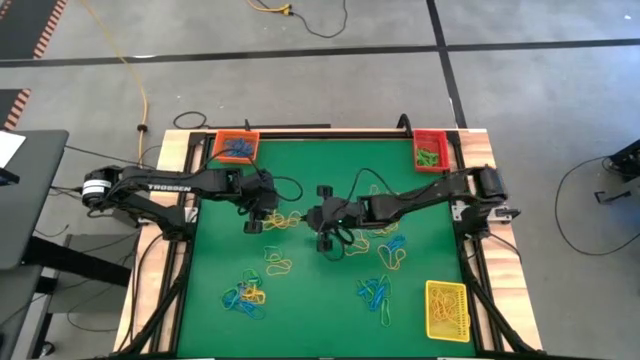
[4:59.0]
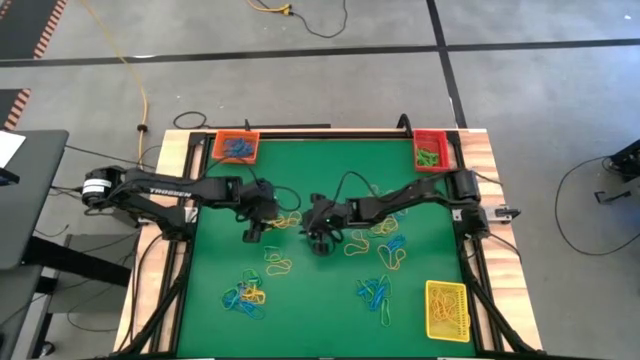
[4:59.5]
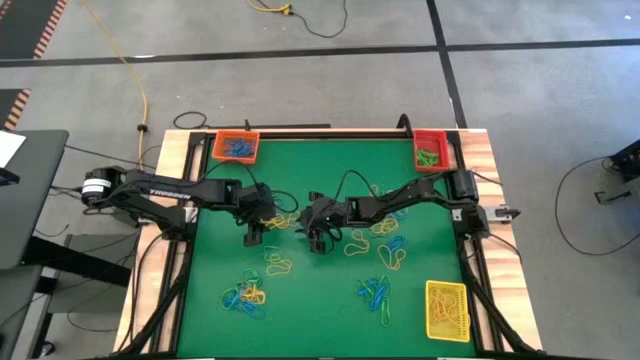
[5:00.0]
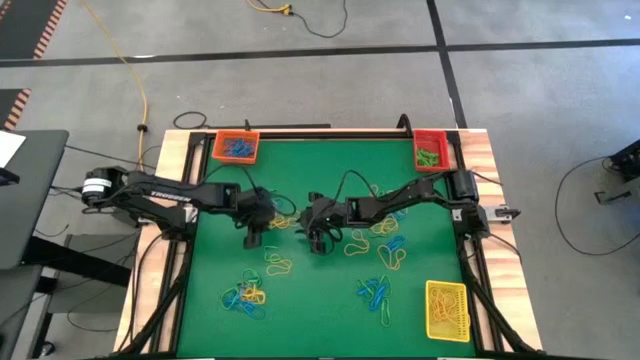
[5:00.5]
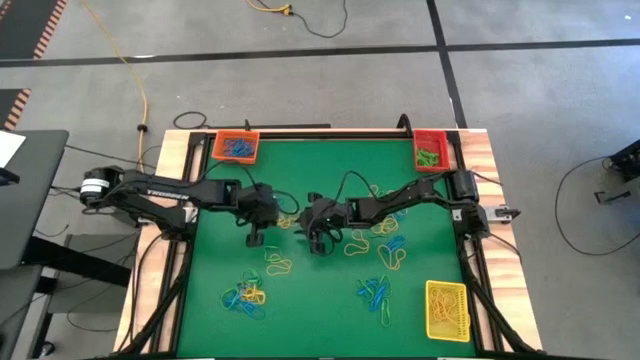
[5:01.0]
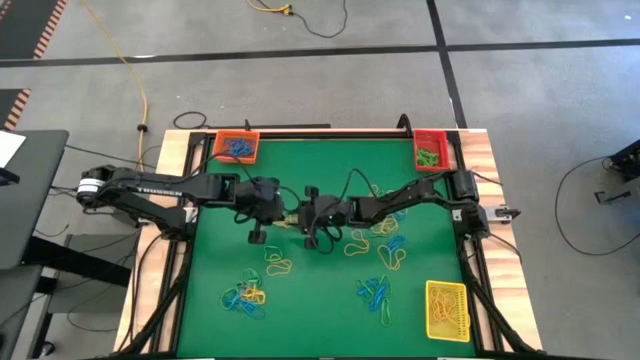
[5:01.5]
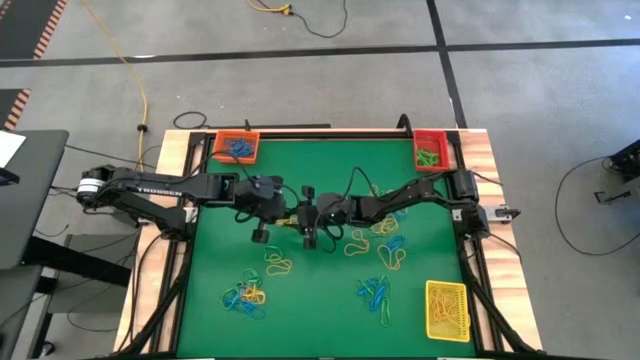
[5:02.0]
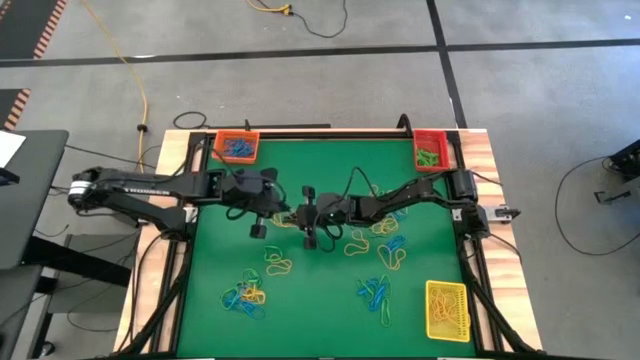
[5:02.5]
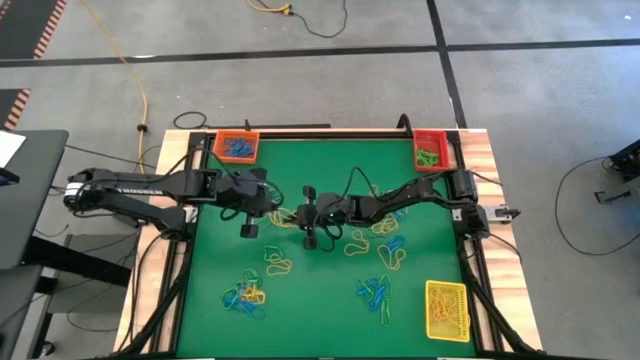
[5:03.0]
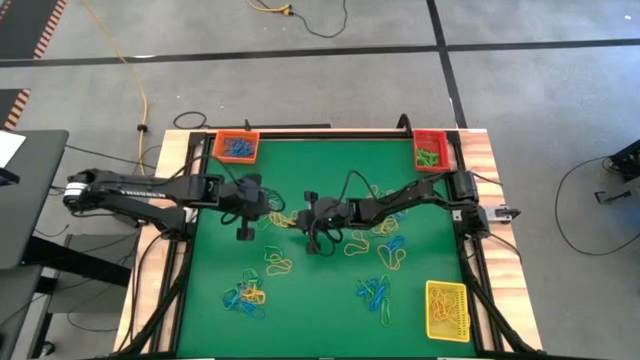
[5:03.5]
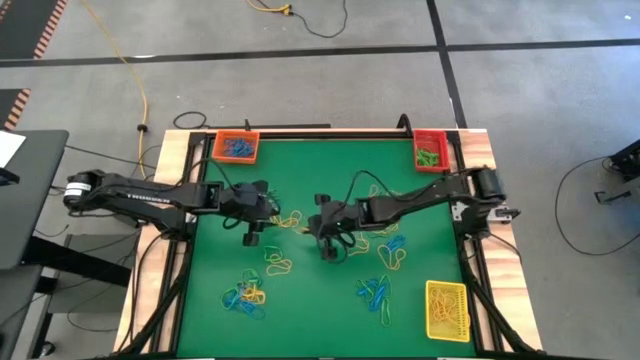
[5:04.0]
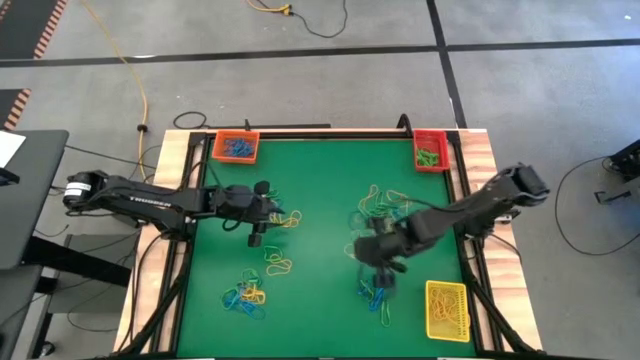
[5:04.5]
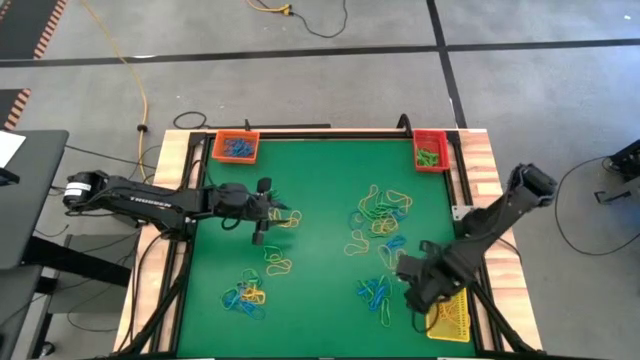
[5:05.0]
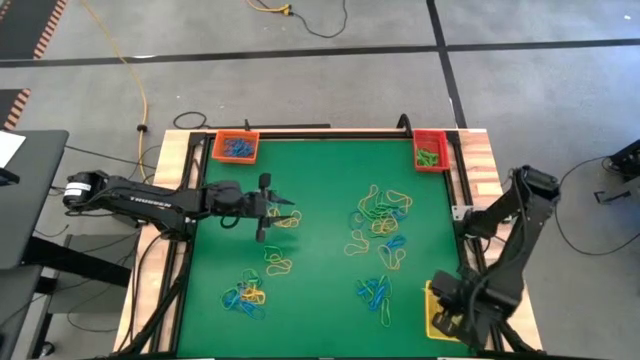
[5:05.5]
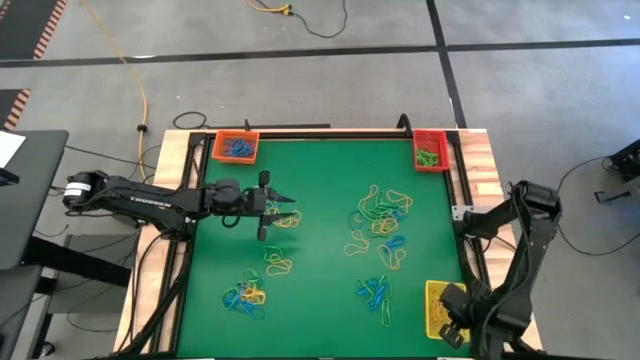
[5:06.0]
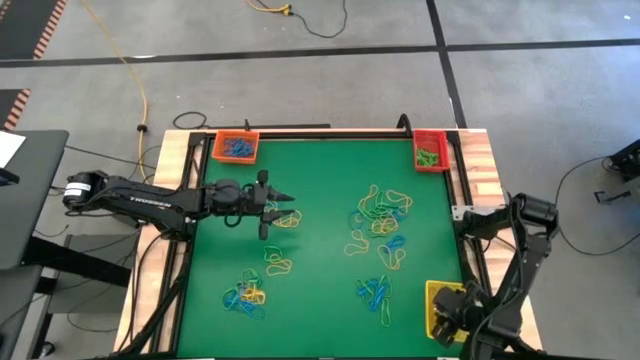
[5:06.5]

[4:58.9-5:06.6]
Task: Sort rubber bands into baskets
Put the top left yellow rubber band into the yellow bin
